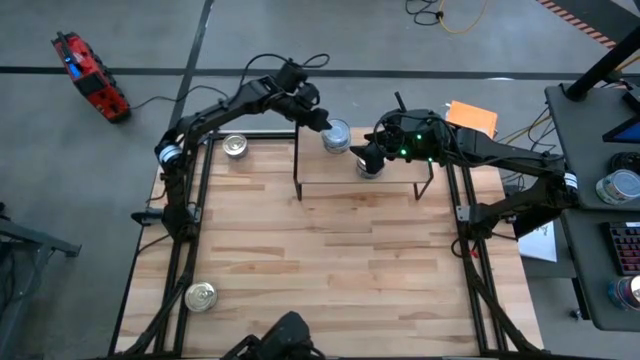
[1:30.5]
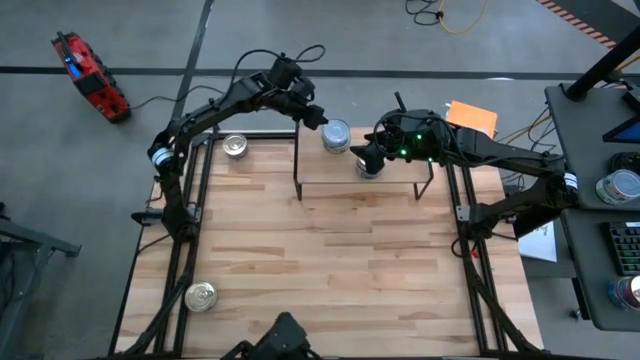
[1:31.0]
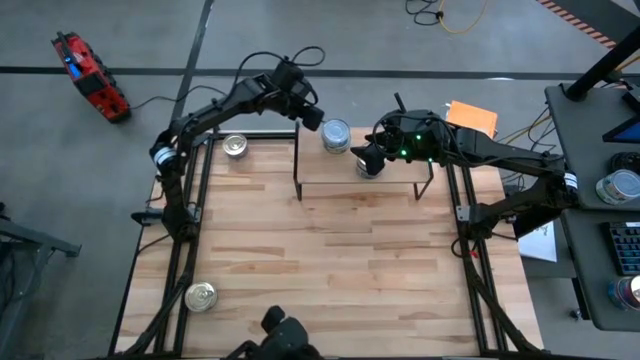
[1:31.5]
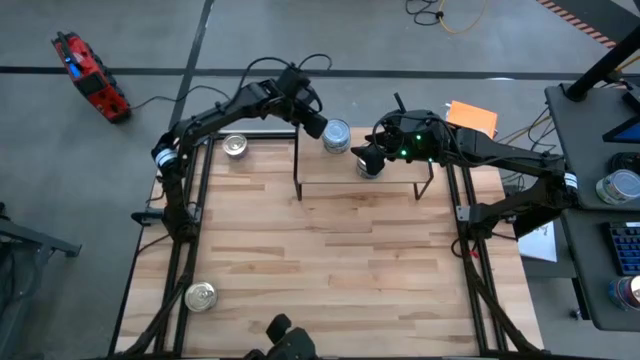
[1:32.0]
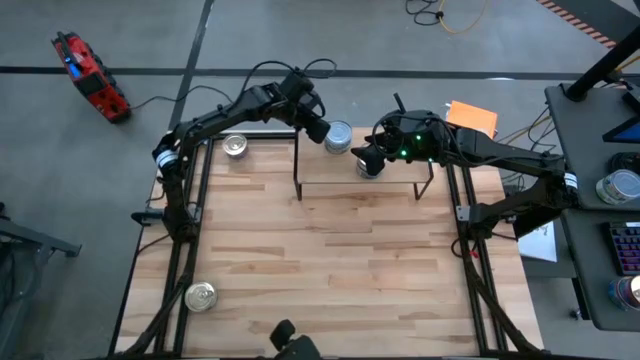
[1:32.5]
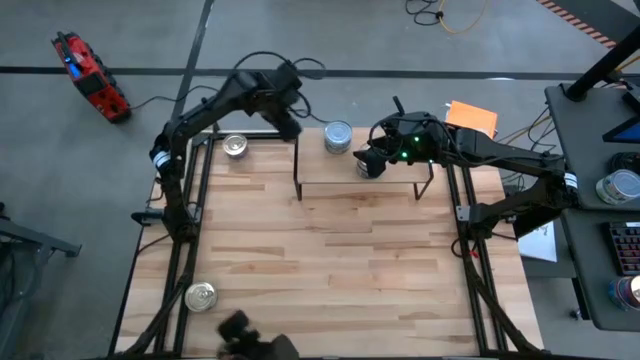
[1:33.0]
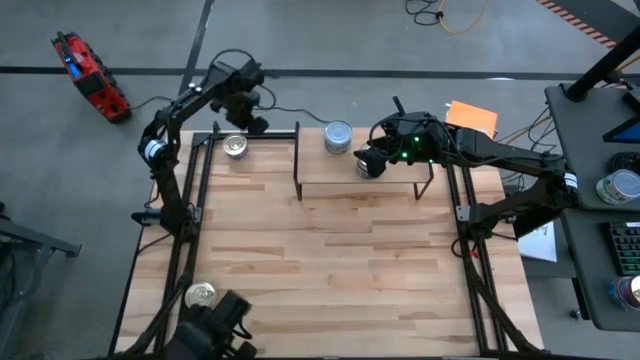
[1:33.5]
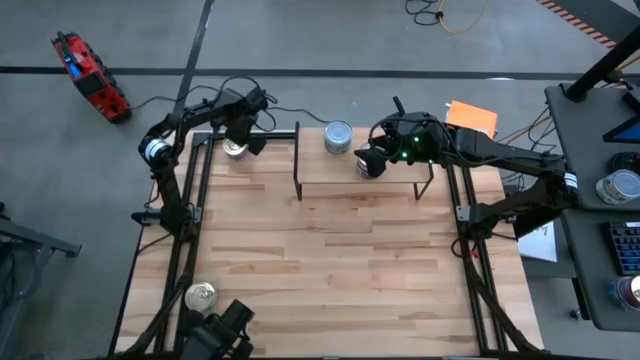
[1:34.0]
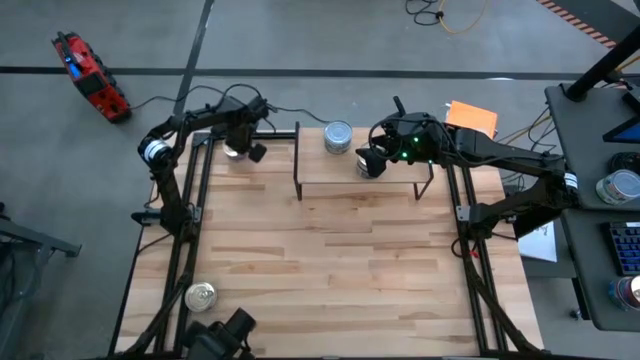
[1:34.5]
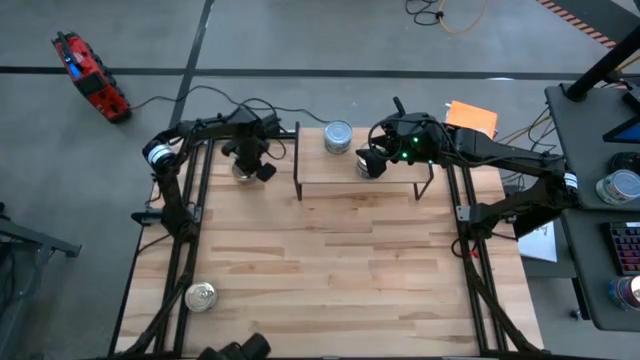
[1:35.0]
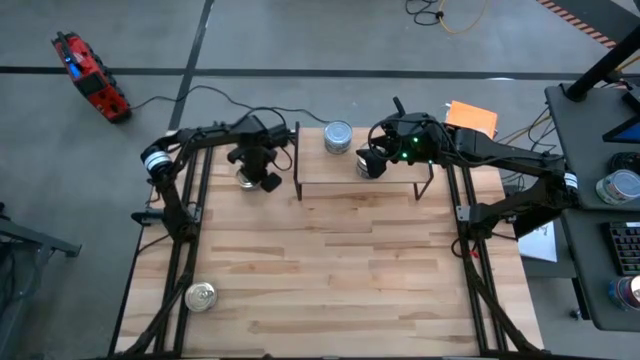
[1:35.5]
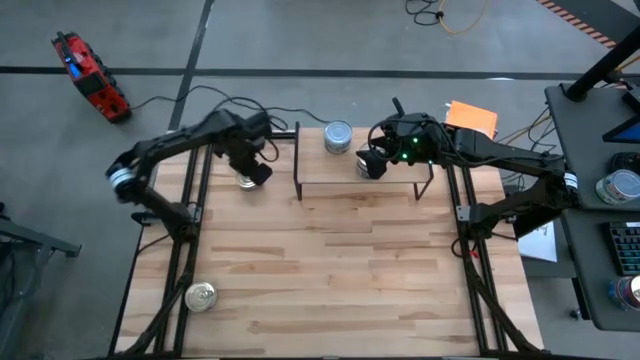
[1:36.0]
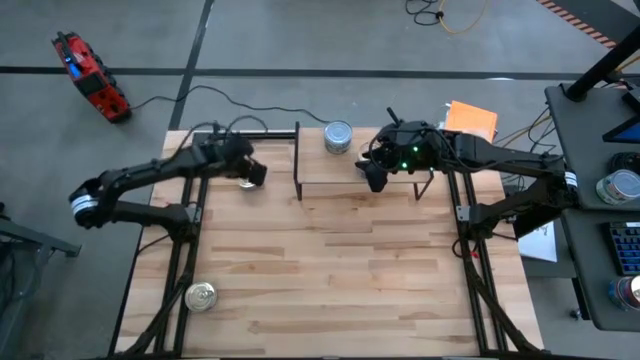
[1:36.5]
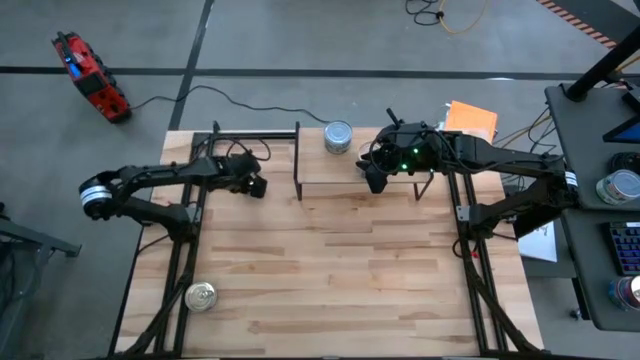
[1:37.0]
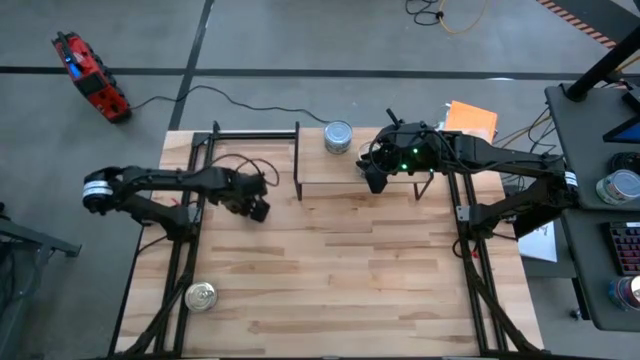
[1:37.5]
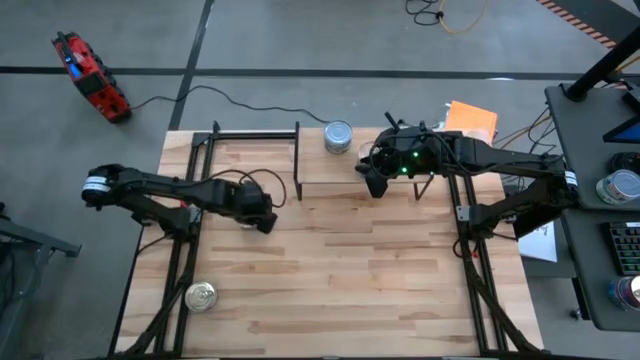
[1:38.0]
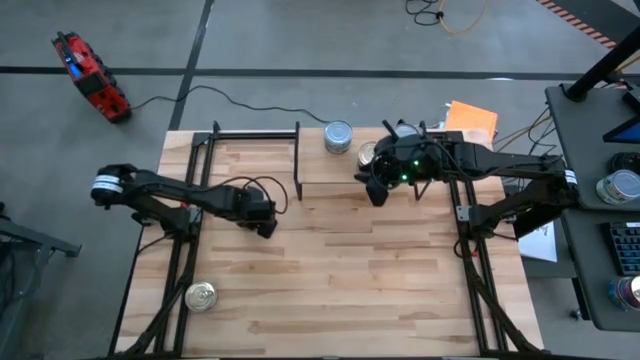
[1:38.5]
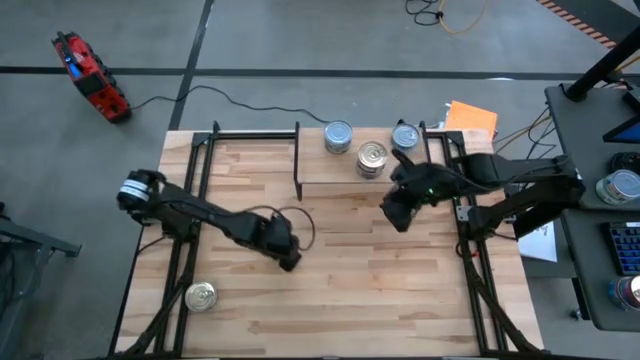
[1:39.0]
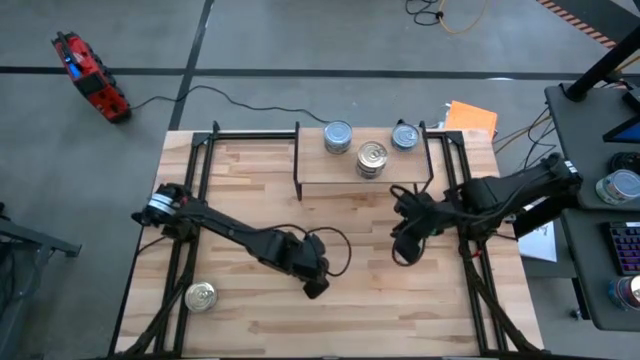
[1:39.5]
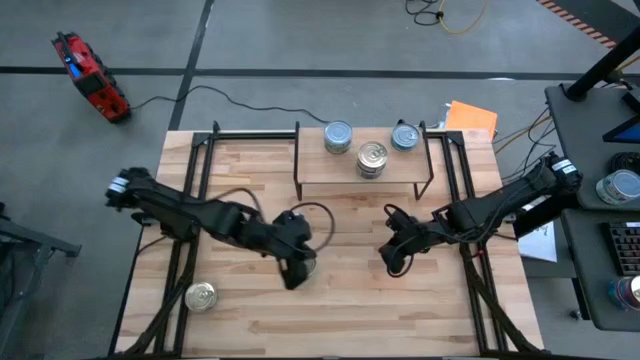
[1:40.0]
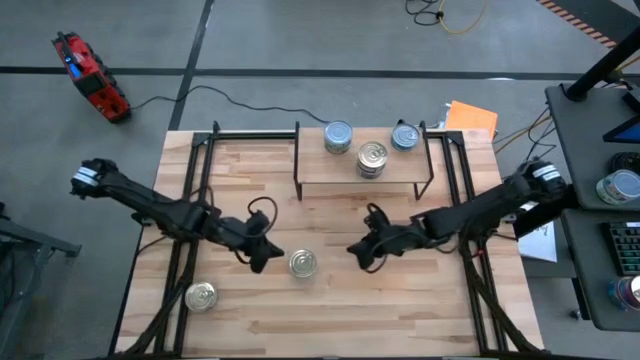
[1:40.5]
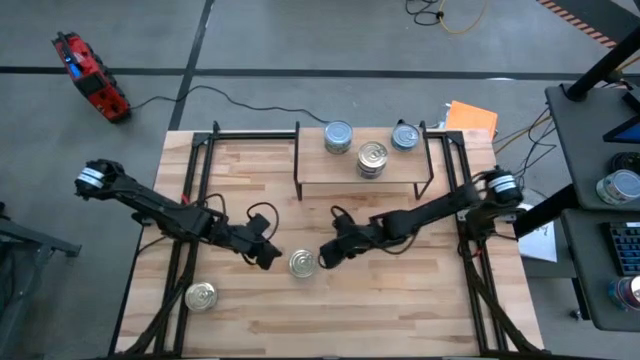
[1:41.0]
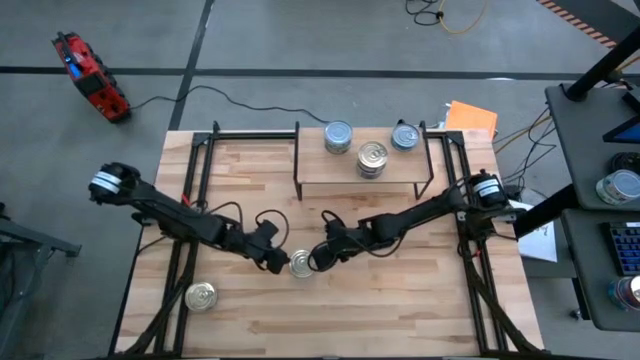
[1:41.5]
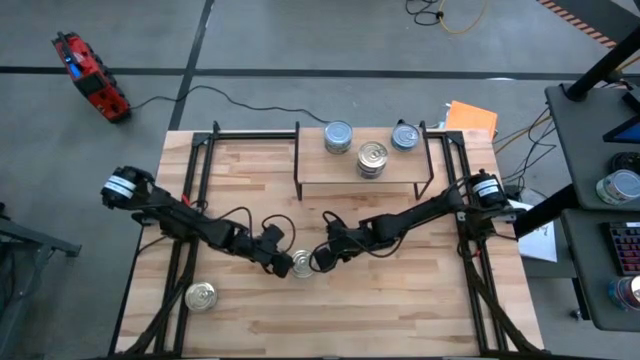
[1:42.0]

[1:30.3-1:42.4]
Task: Stack canned seafood by type on shelf
Stack the blue-pink tuna can on top of the other blue-pink tuna cans

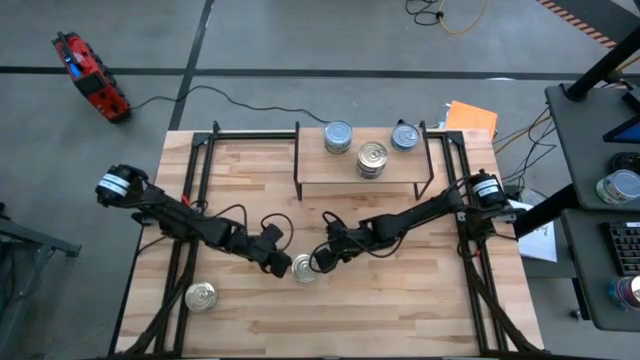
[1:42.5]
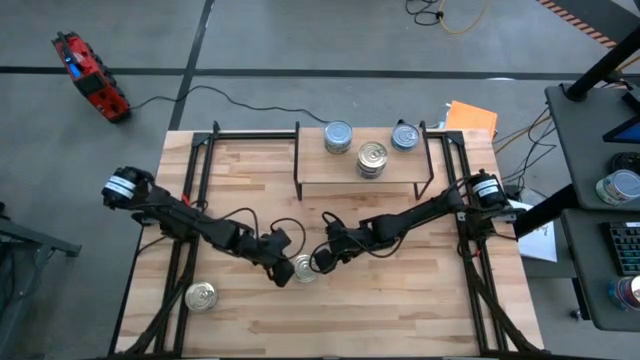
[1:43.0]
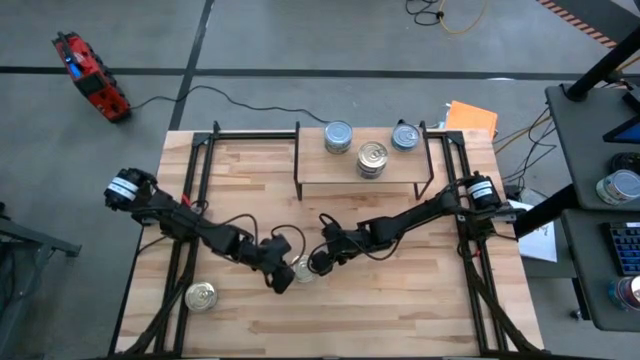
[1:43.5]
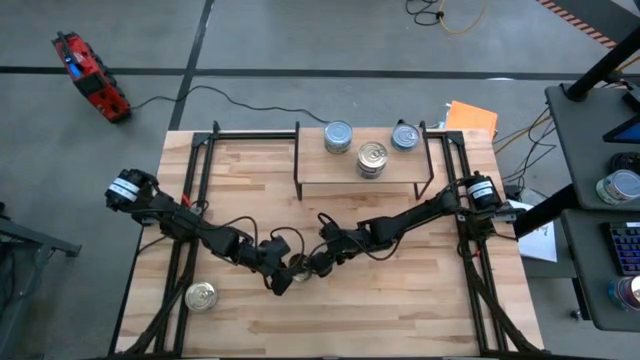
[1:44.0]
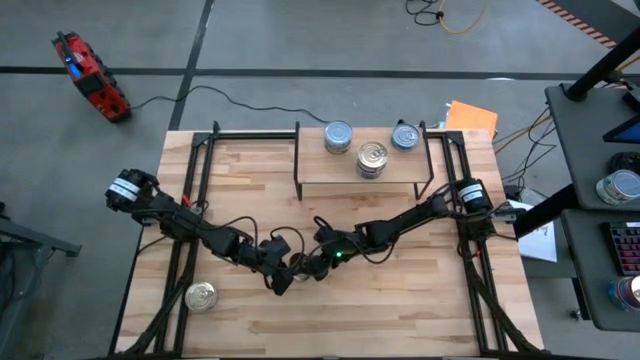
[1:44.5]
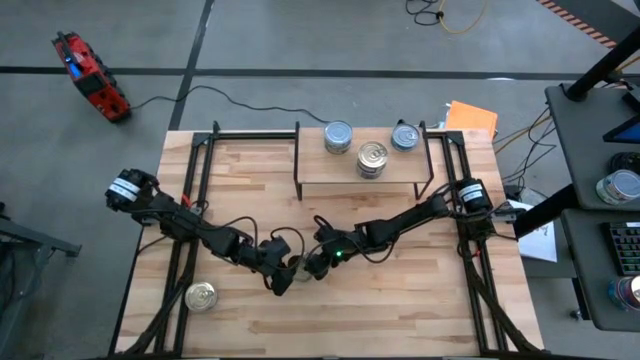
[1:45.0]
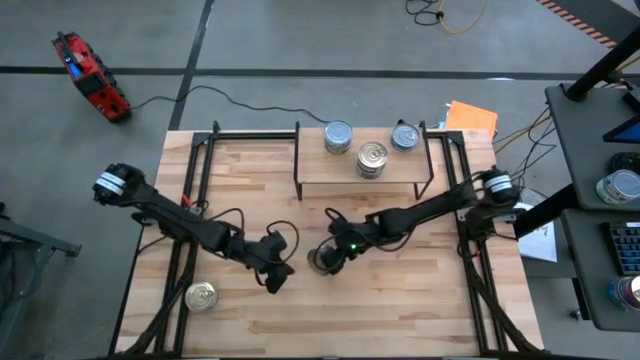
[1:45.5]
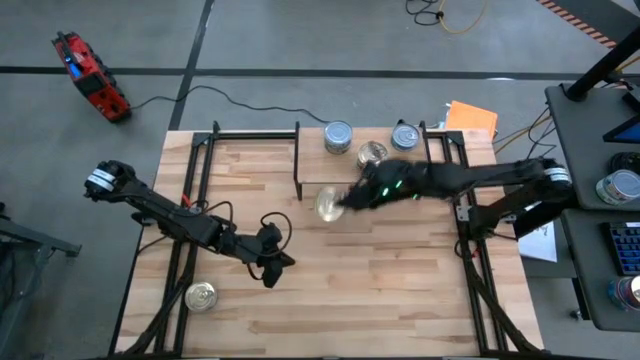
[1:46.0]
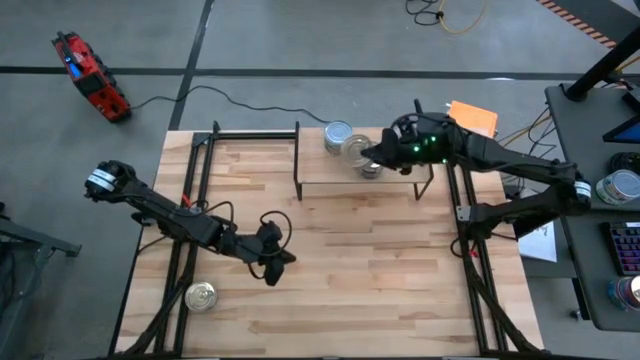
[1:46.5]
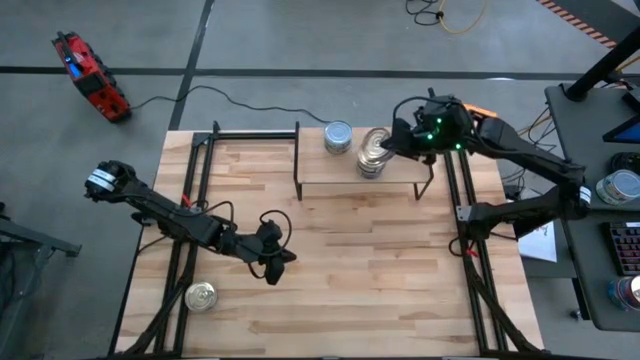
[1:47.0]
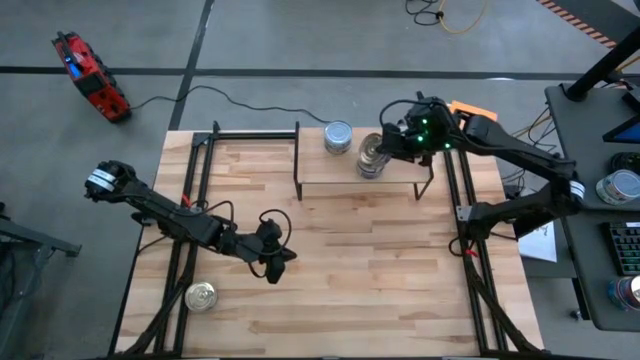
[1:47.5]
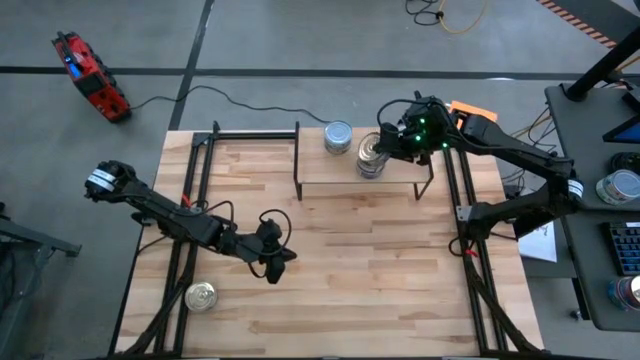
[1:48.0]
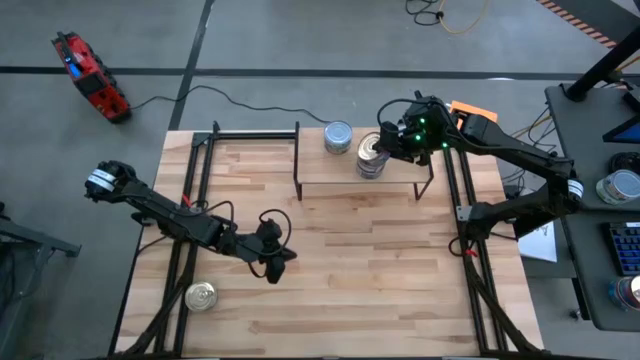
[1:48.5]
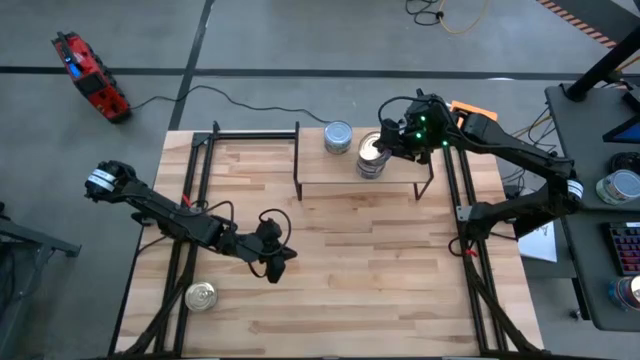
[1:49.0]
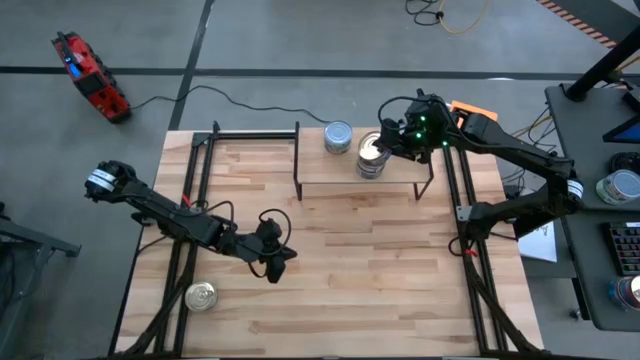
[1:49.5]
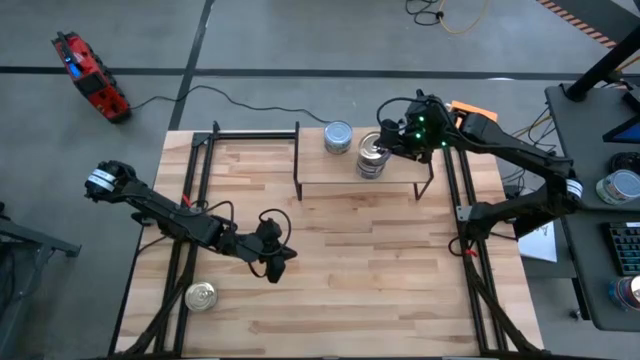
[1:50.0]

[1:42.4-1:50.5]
Stack the blue-pink tuna can on top of the other blue-pink tuna cans

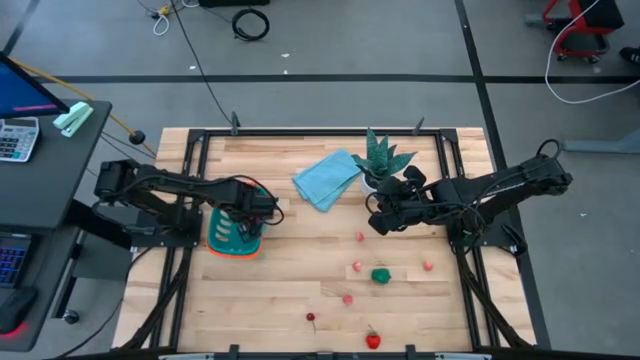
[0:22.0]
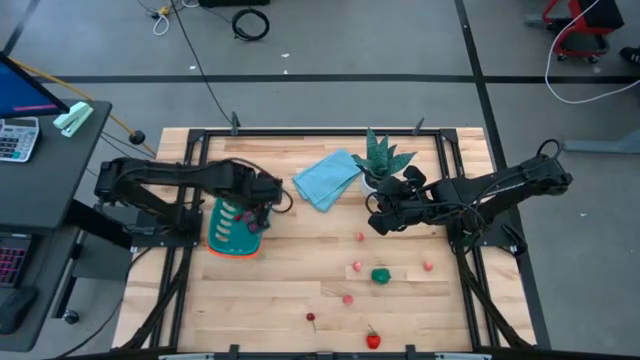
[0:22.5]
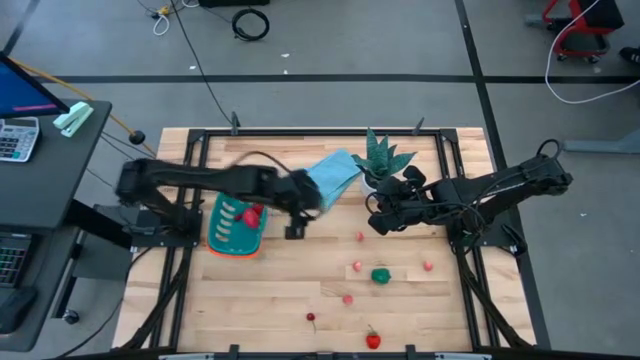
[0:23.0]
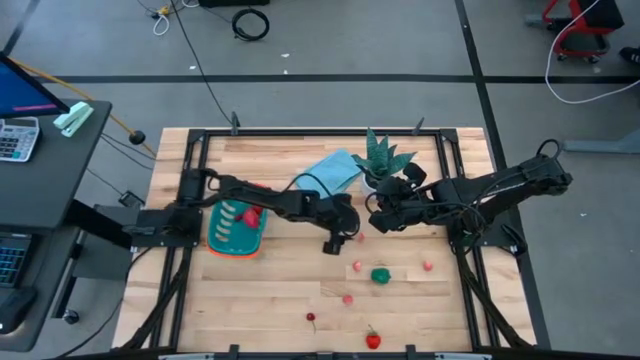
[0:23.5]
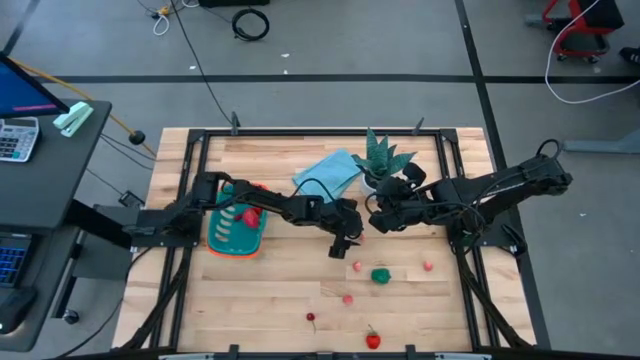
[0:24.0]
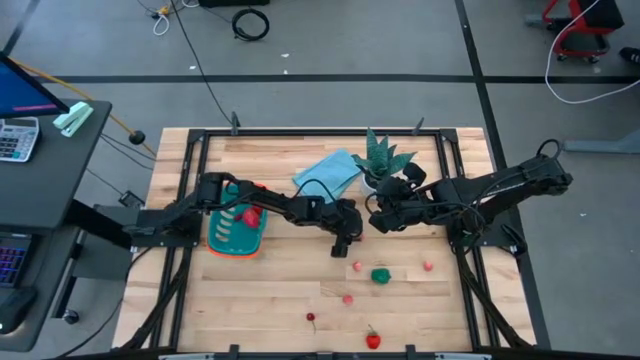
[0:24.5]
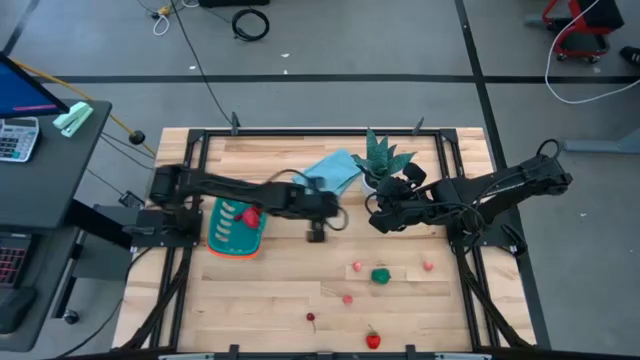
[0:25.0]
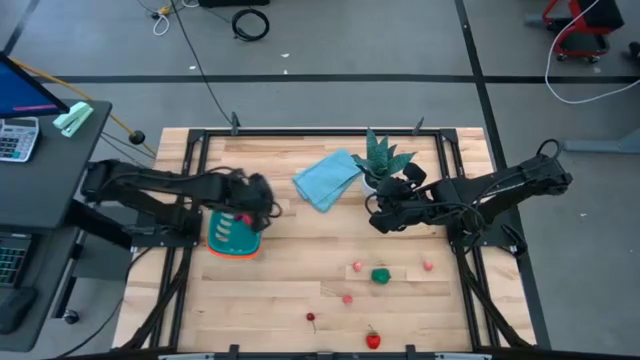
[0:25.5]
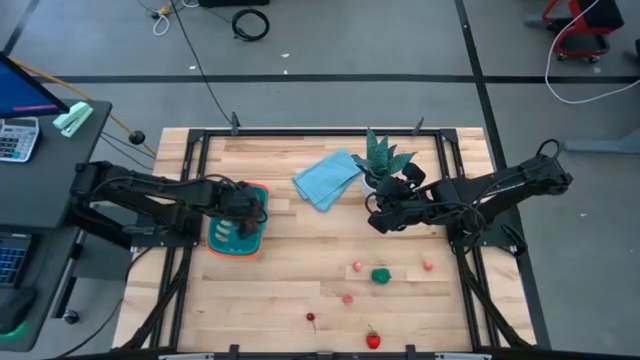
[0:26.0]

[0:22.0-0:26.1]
Task: Pick and placing Produce into tupperware
Put the pink peach into the blue basket
